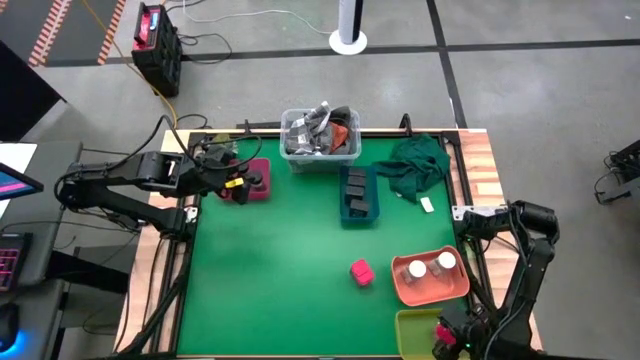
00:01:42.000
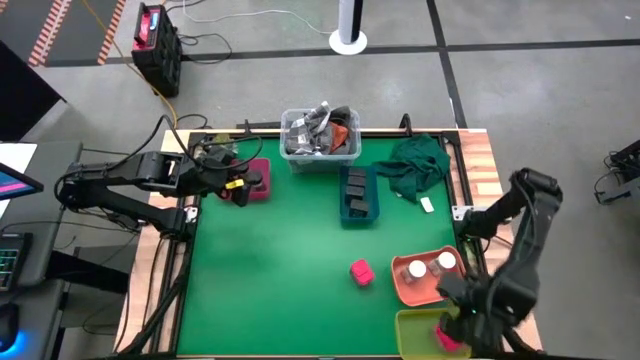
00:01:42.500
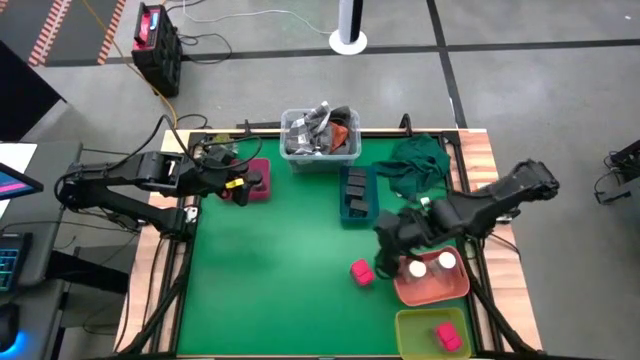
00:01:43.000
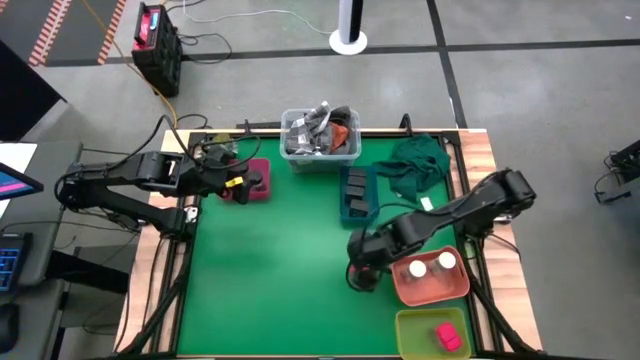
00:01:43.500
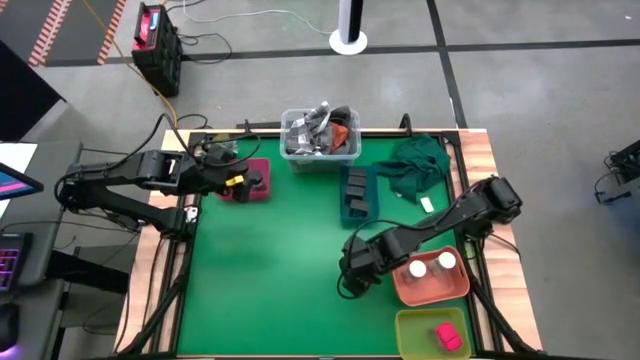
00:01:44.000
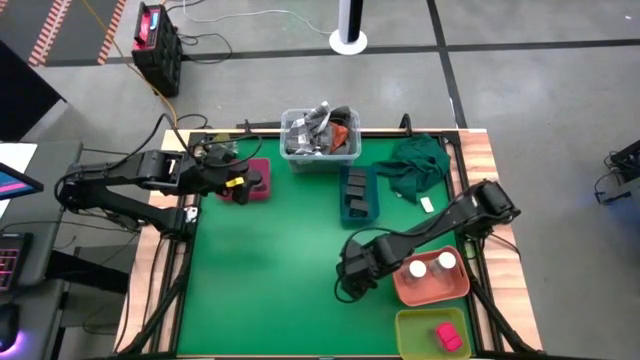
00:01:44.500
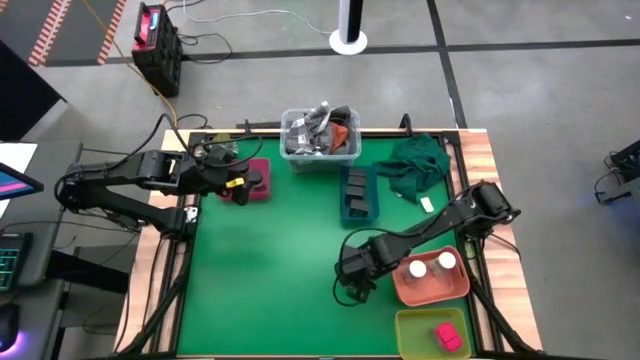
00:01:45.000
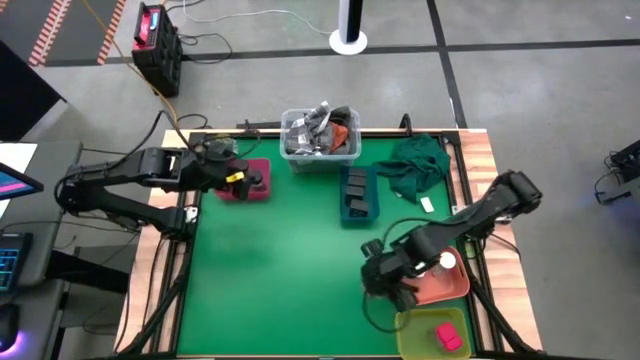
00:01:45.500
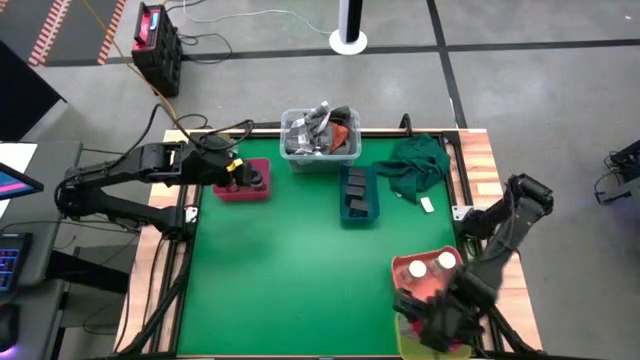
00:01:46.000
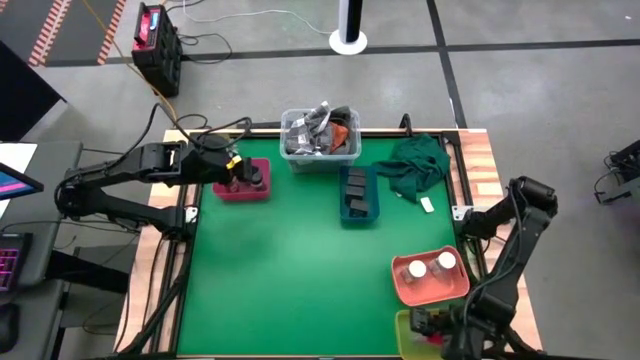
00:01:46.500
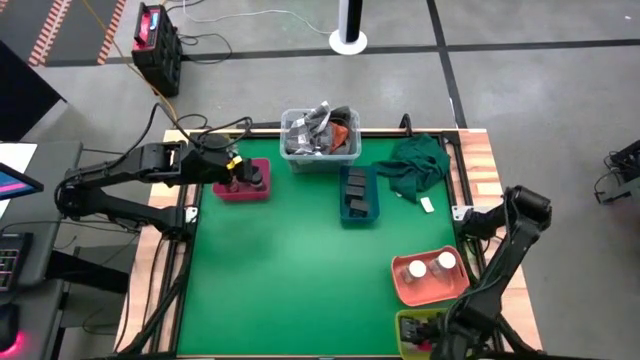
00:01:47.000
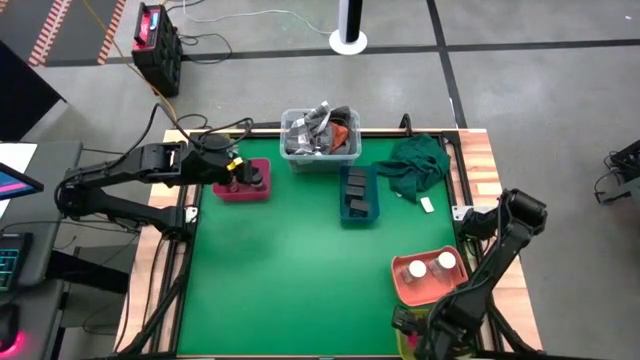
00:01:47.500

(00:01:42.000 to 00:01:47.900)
Task: Sort spices by type
Put the red seasoning can into the yellow bin

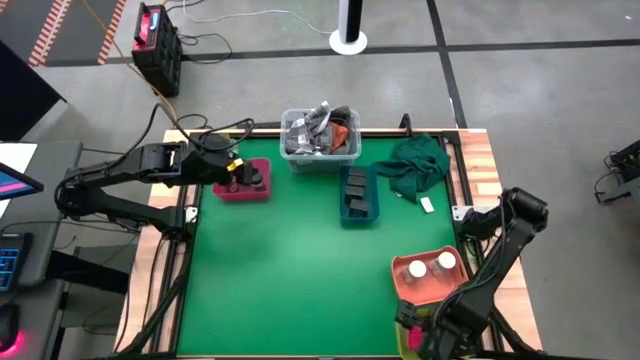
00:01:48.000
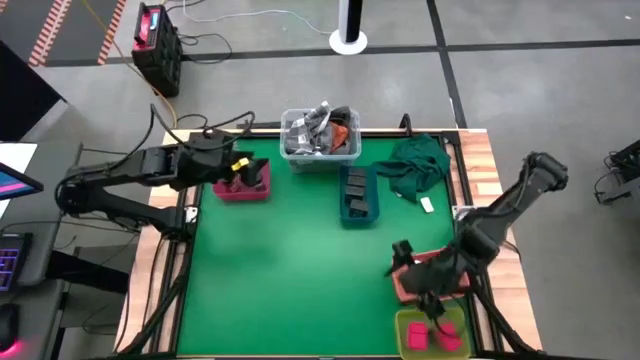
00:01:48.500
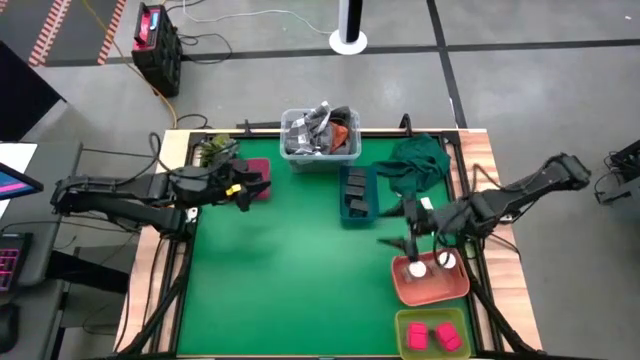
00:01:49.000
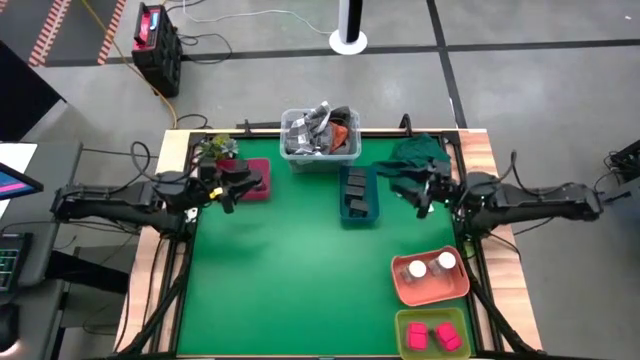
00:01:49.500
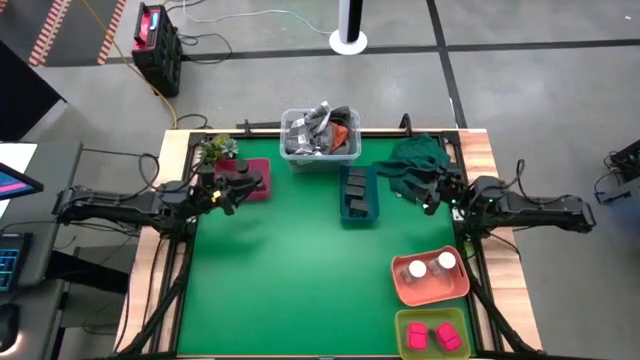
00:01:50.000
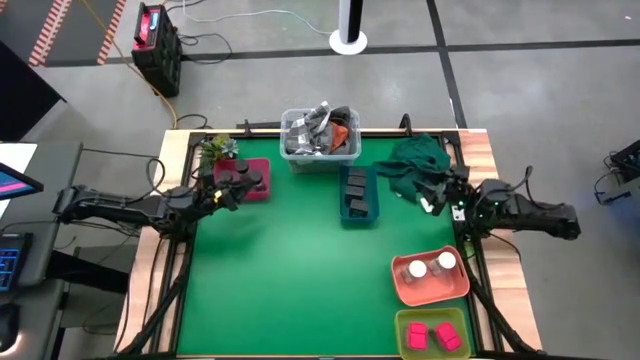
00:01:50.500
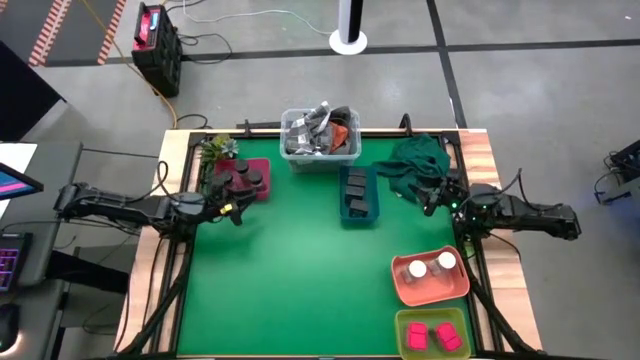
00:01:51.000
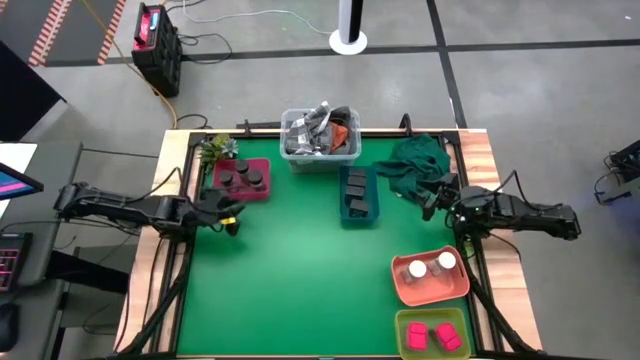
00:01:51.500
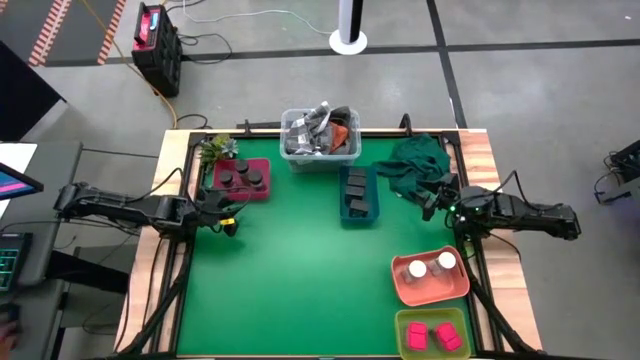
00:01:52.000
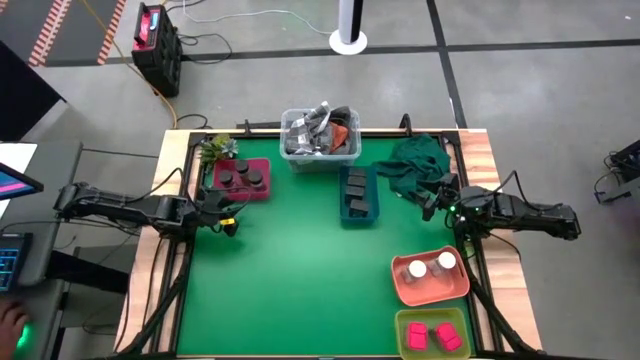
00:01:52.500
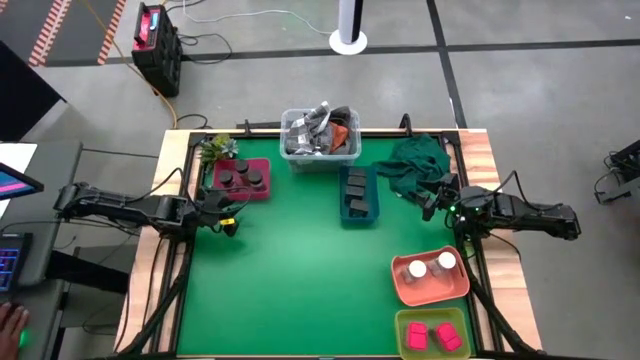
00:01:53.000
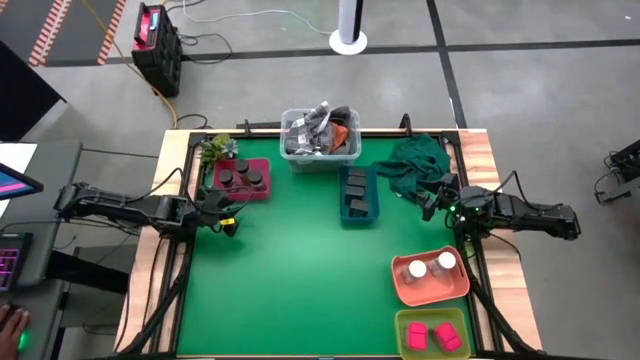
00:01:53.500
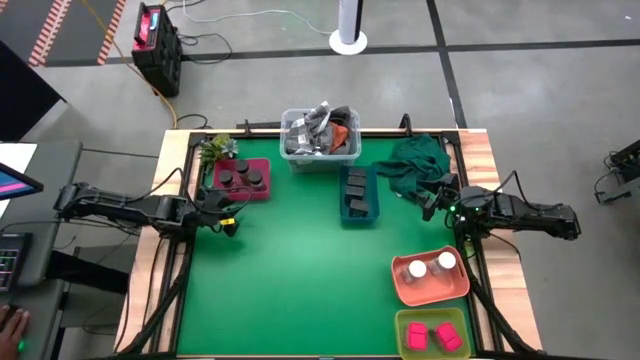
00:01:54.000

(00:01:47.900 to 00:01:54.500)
Return to Home Position

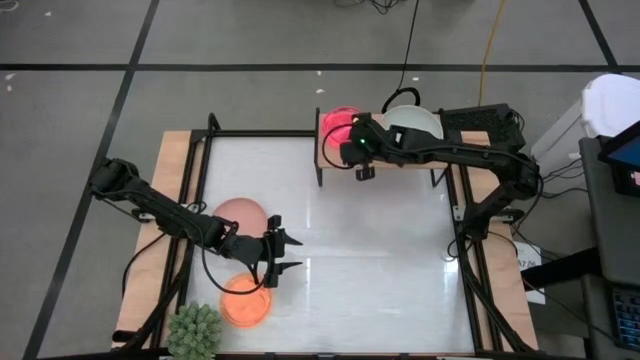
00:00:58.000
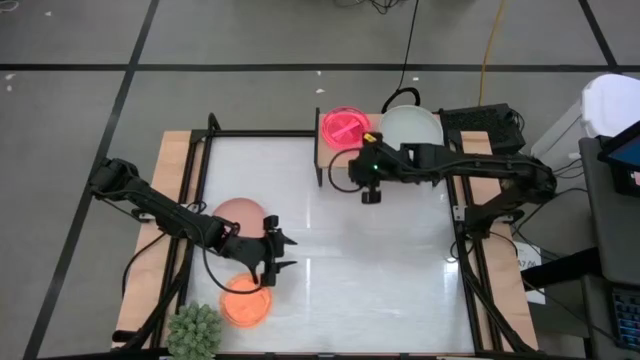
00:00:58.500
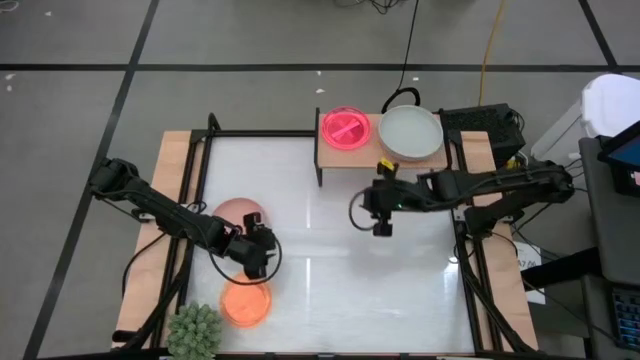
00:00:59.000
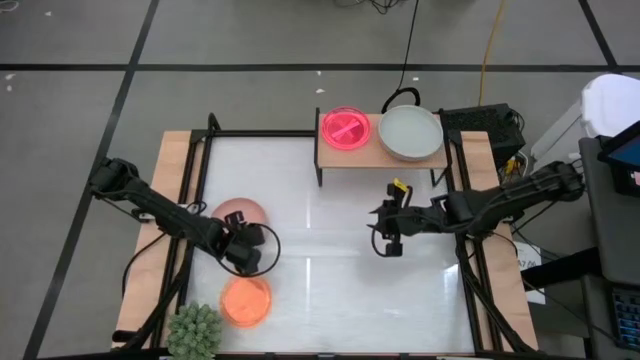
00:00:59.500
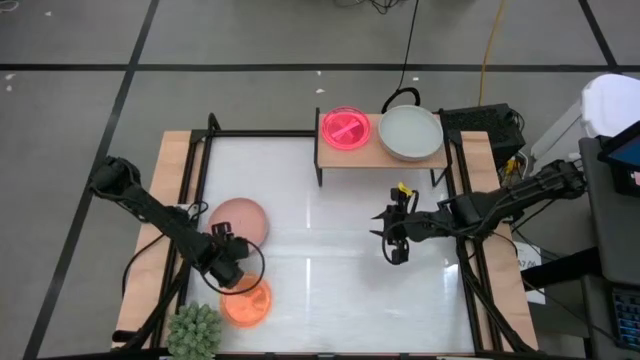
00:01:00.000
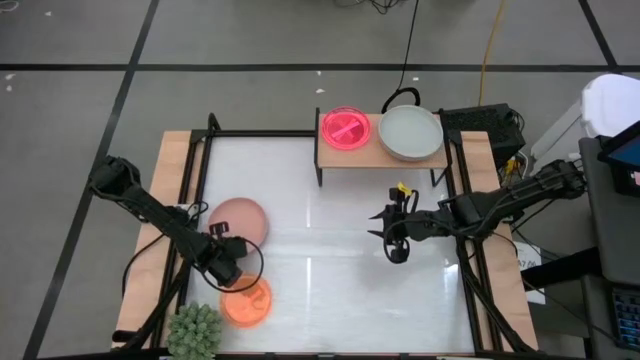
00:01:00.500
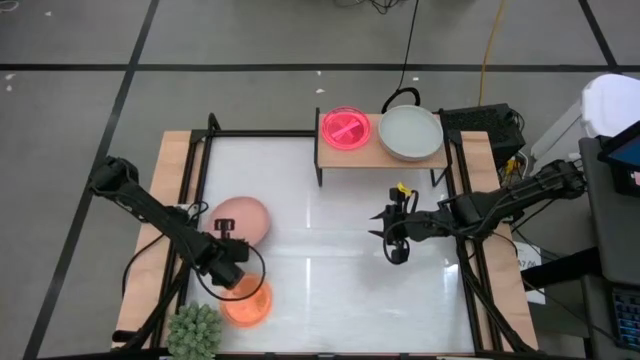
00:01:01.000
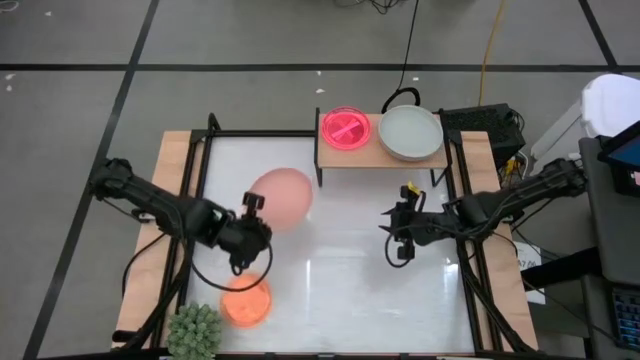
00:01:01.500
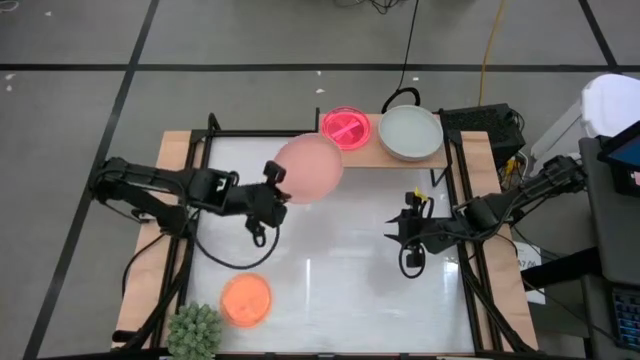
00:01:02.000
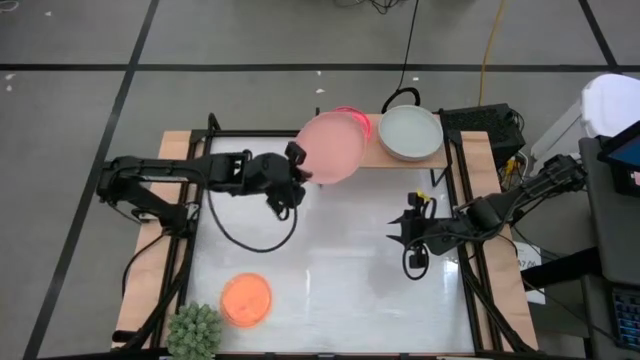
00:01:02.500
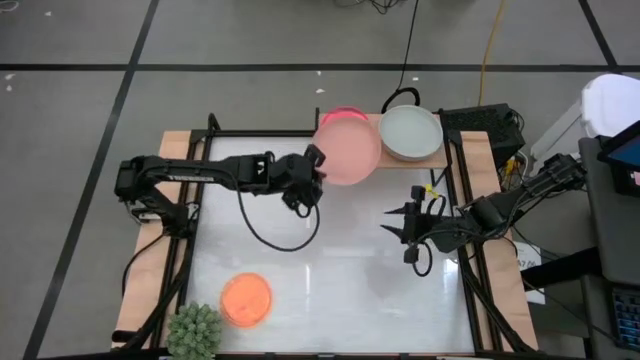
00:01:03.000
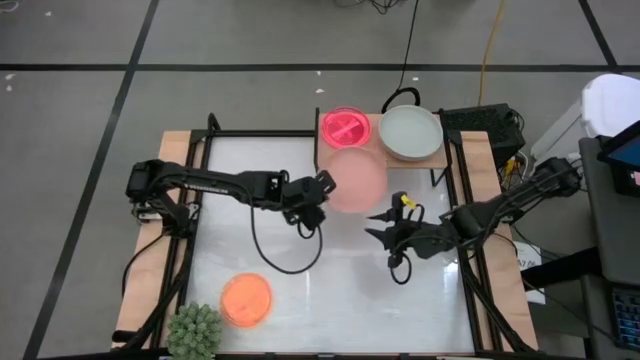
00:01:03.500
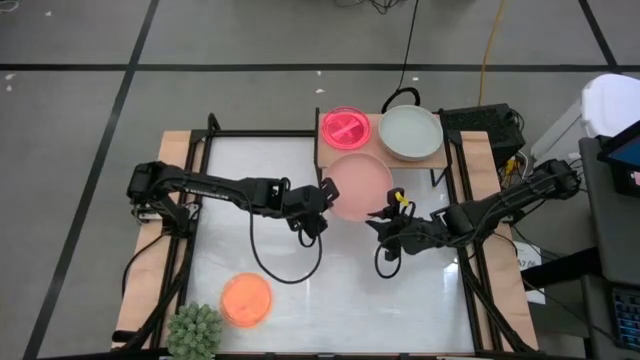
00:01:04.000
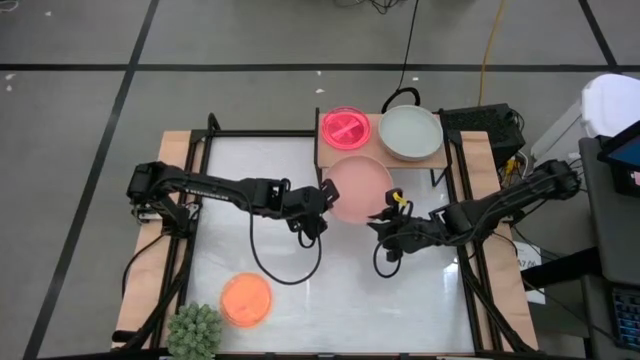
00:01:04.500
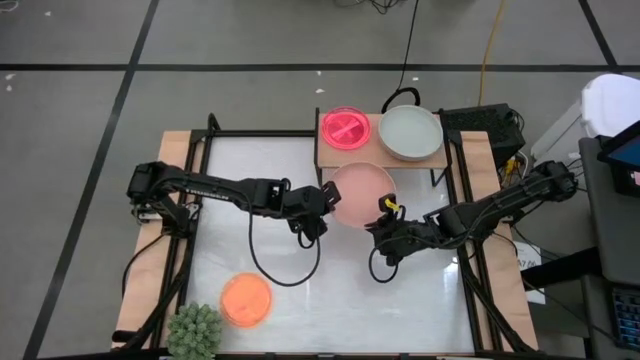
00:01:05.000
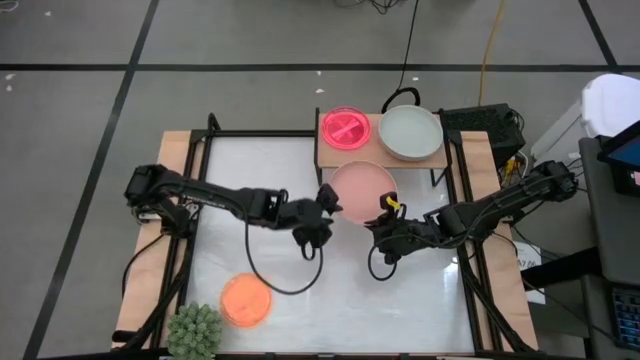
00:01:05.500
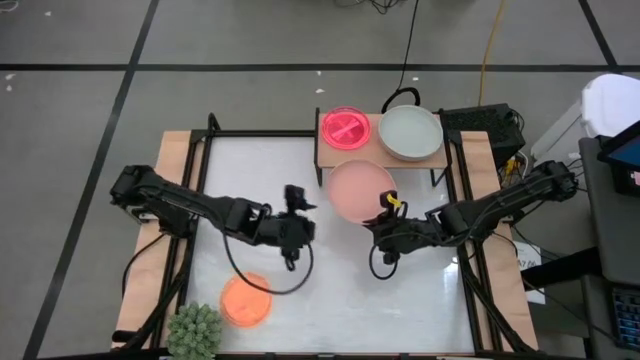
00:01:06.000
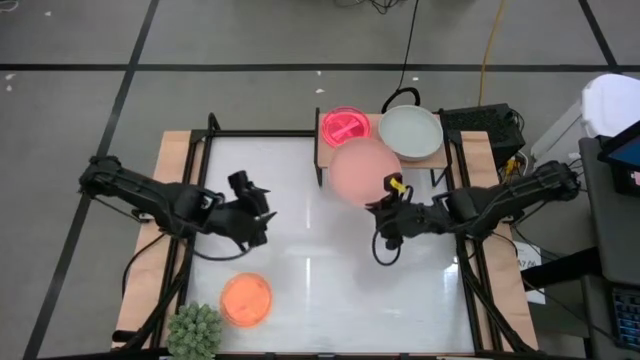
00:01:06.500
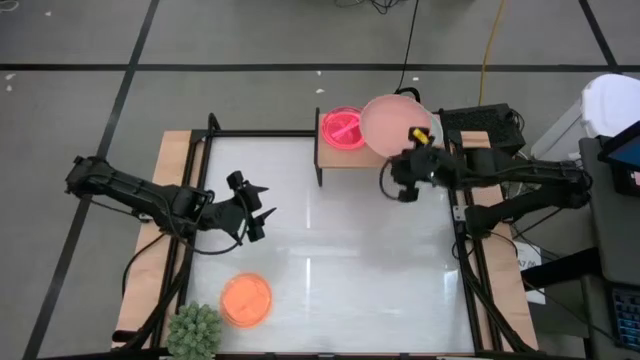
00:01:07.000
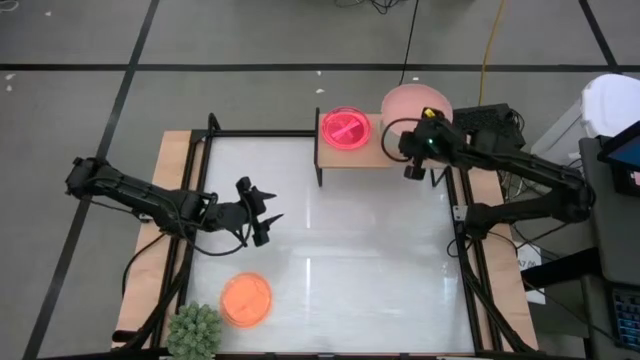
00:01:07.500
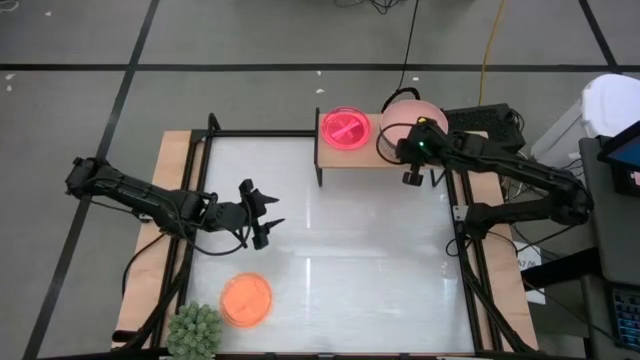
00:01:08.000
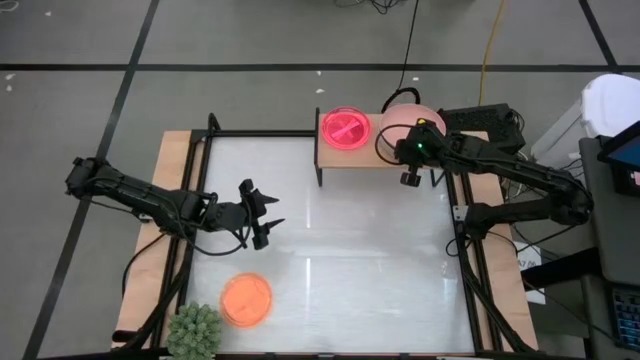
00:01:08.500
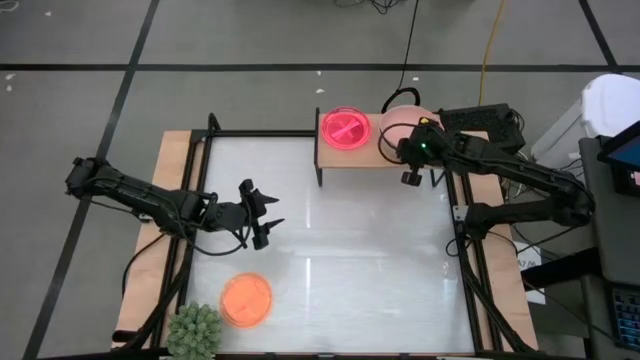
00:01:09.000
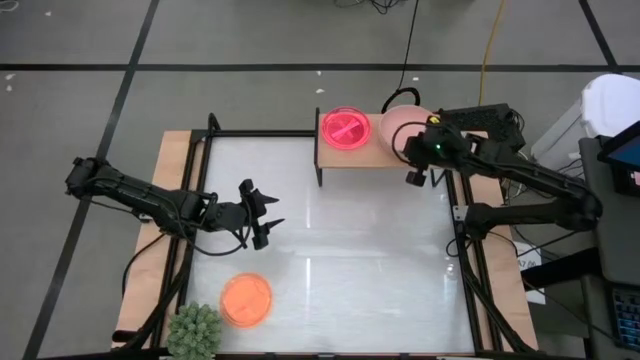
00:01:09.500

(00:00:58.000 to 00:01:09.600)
Task: Place and stack plates onto a shelf
Stack the dark pink plate on top of the gray plate on the shelf
